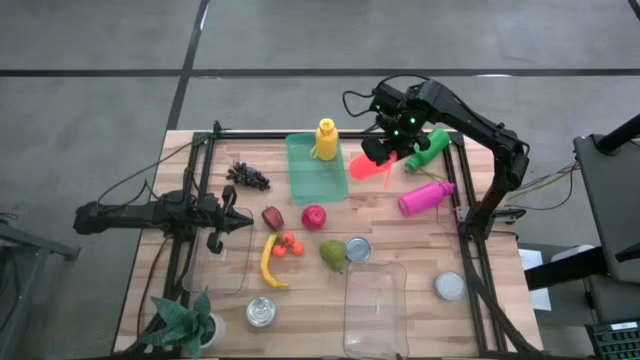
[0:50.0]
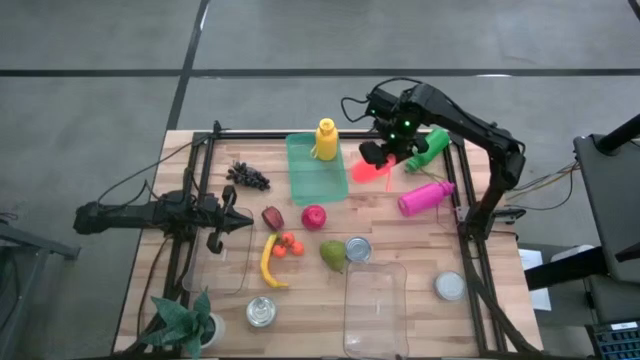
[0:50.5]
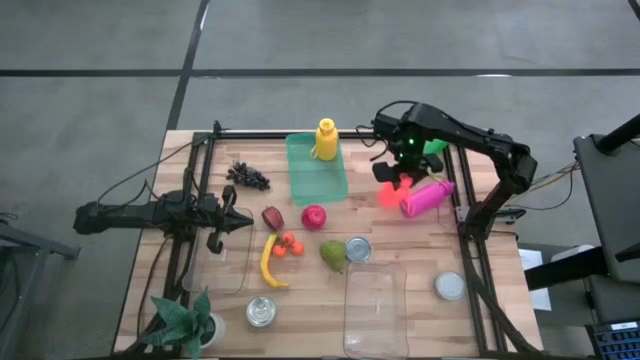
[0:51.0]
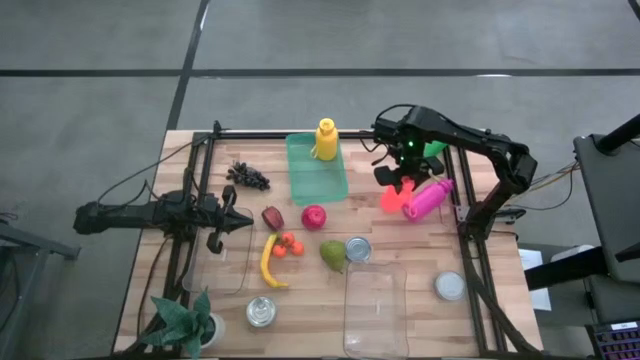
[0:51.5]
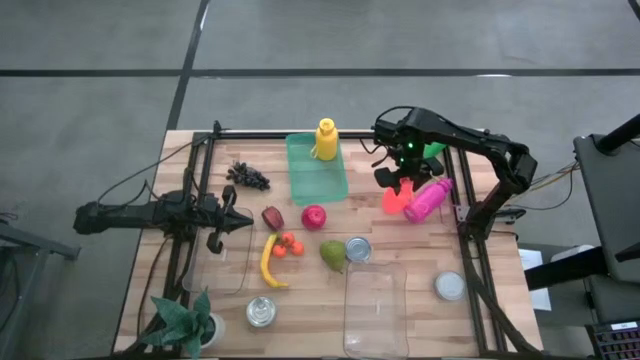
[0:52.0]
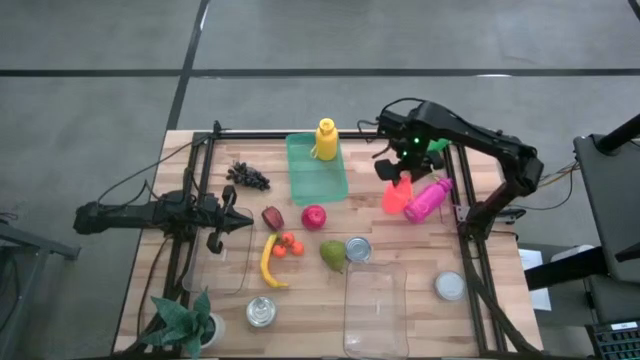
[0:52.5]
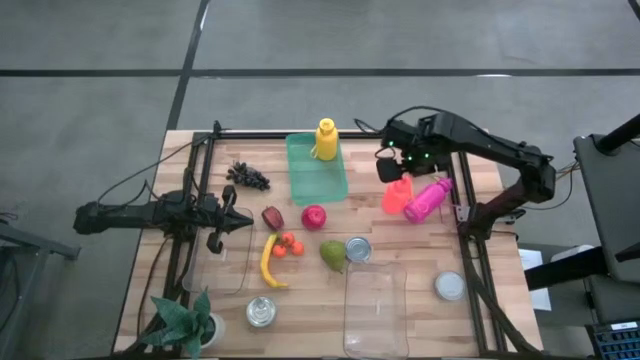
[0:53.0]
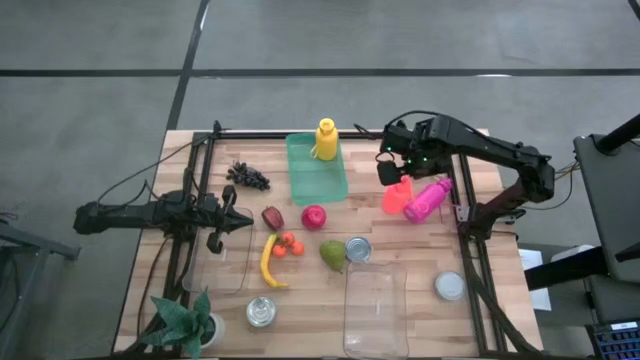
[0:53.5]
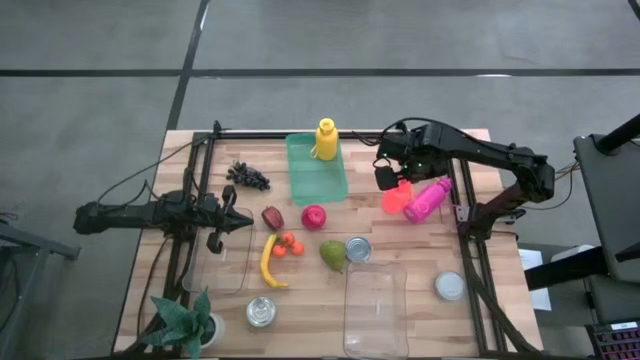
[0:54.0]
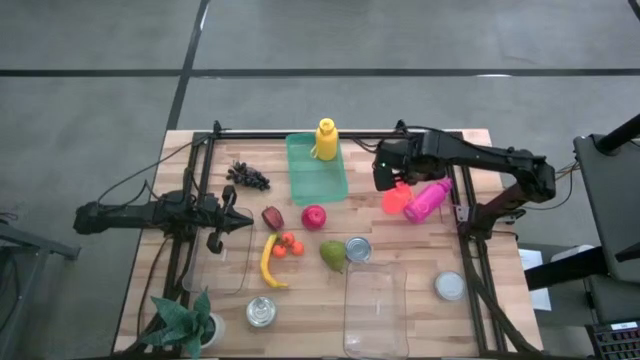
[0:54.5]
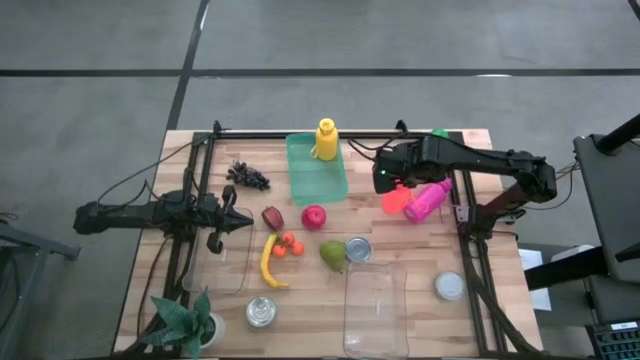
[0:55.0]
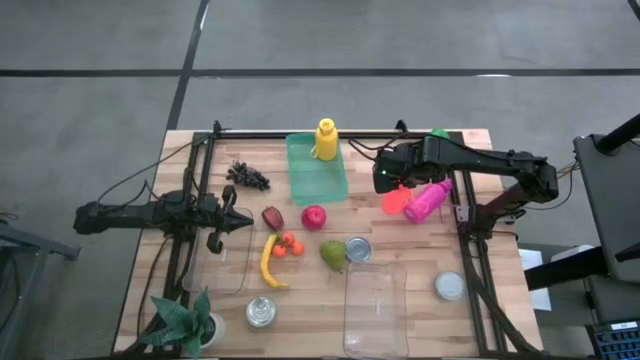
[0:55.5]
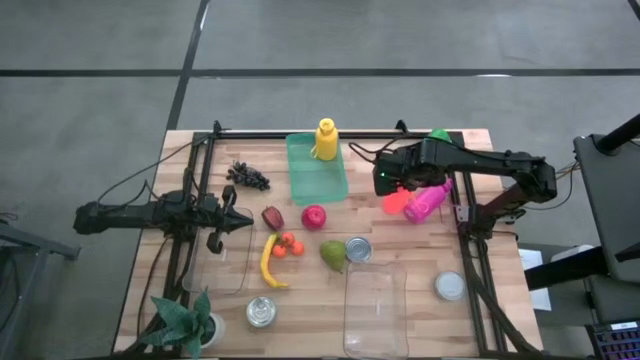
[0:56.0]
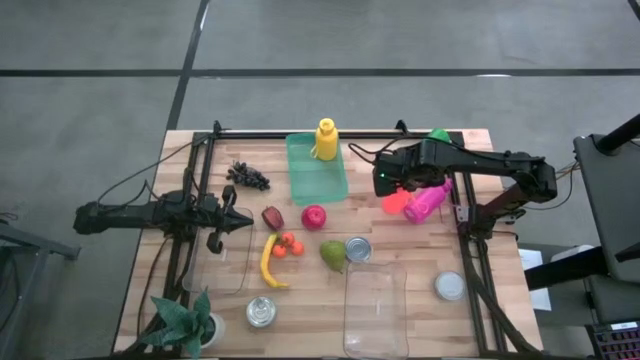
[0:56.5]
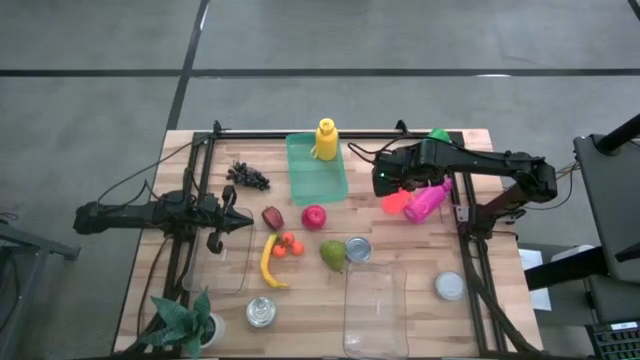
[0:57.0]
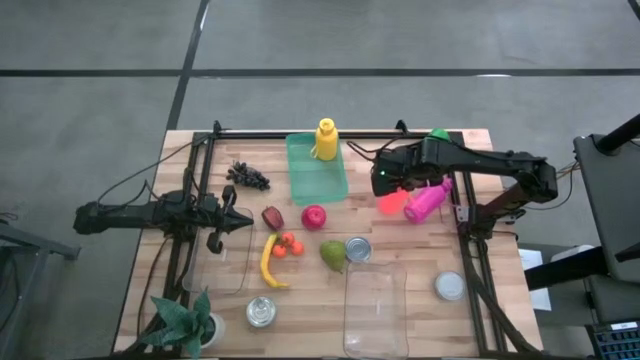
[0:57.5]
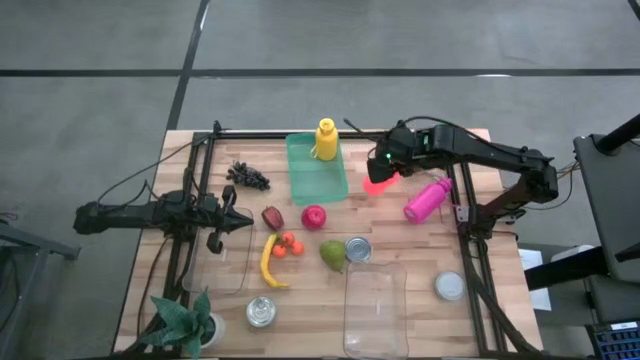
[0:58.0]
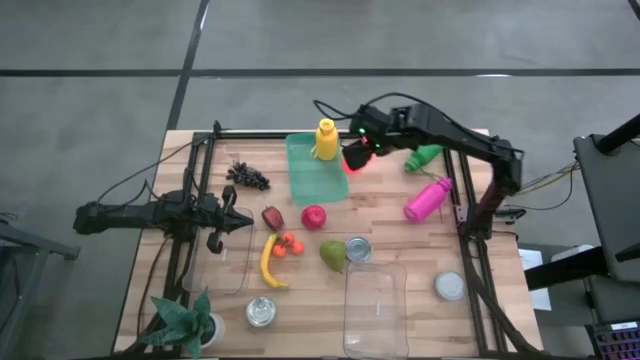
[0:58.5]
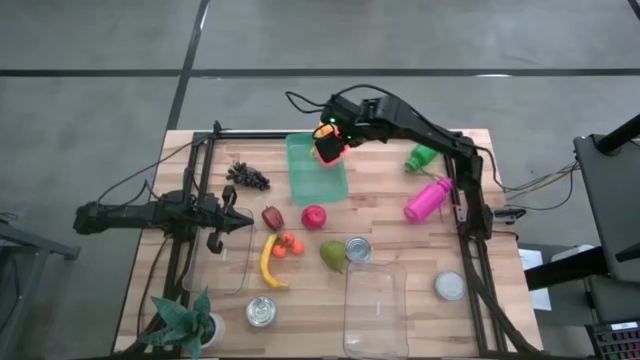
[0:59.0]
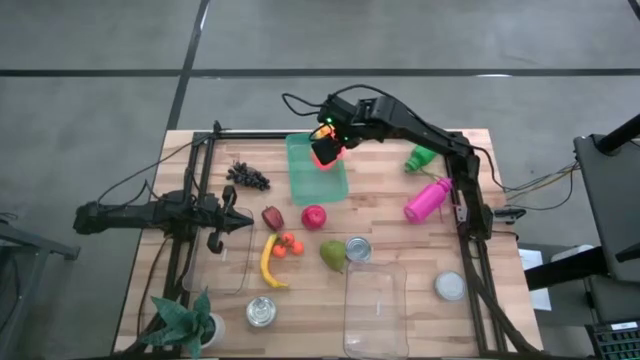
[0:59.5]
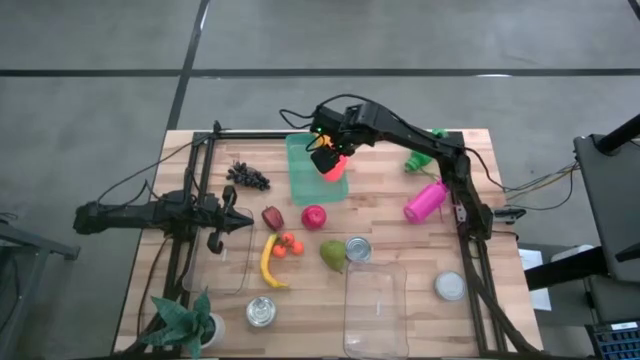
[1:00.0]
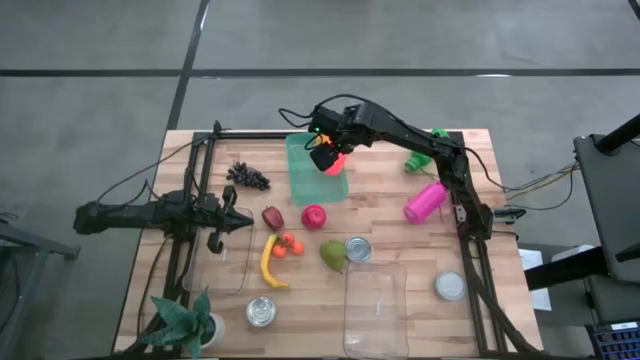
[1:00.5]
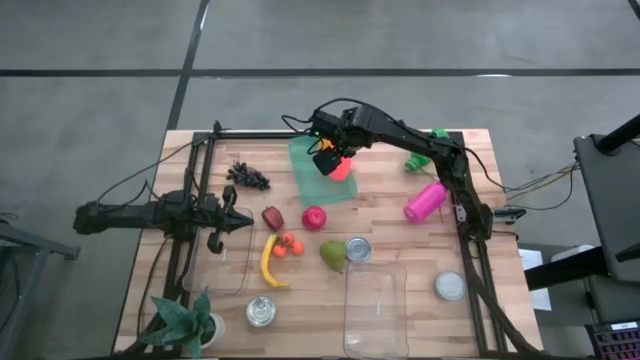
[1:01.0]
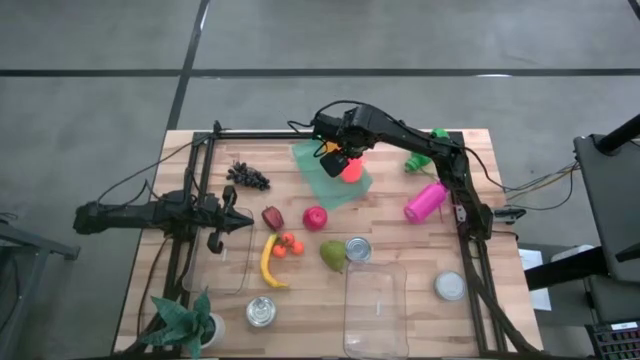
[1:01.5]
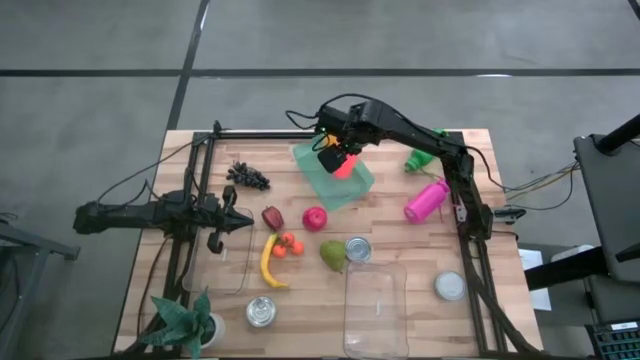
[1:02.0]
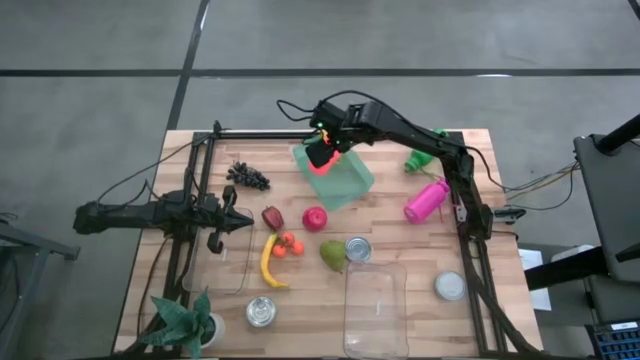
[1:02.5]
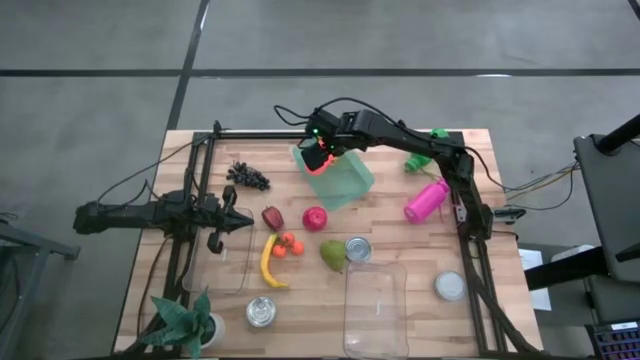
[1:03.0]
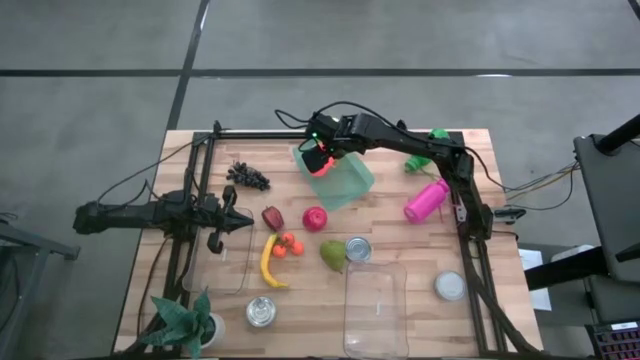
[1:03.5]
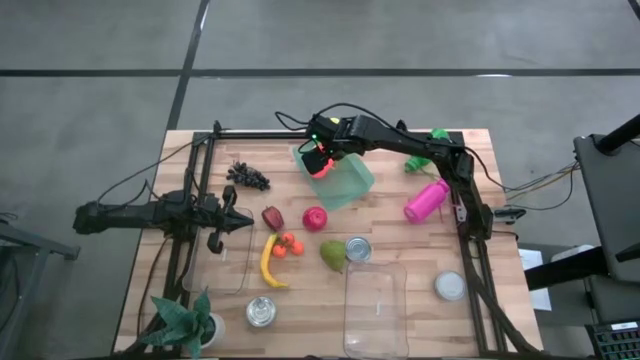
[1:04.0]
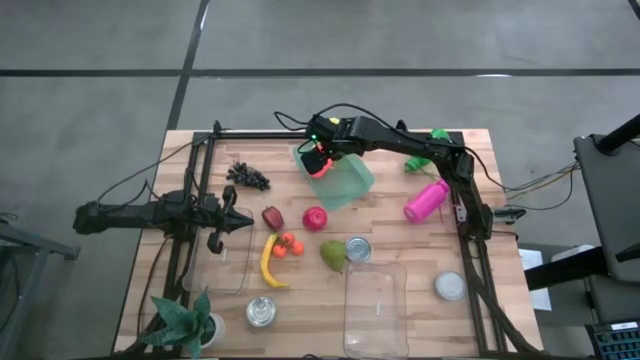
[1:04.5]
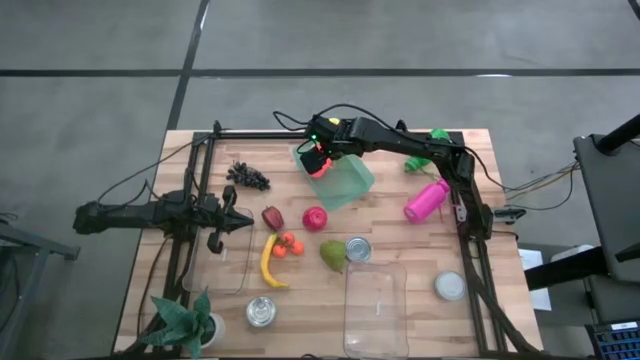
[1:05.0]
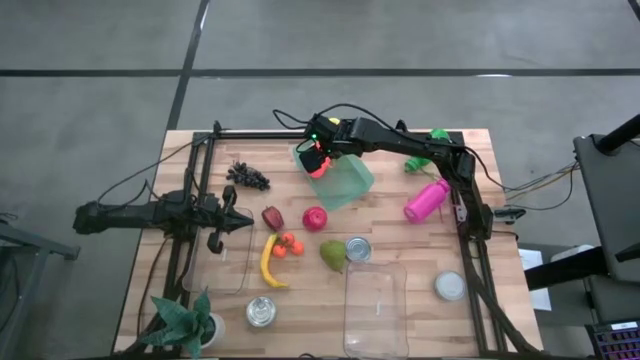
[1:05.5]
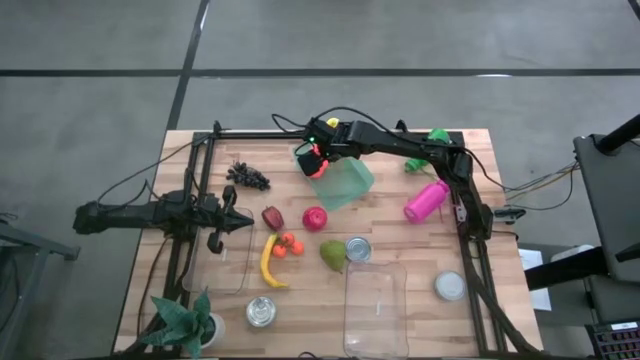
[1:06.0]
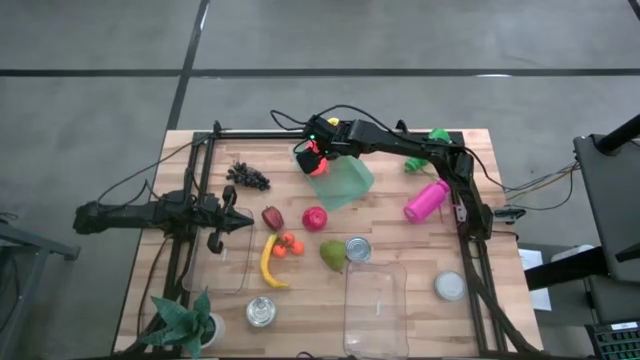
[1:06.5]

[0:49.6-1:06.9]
Task: Pick & Place Food Item
Put the orange water bottle into the green bin

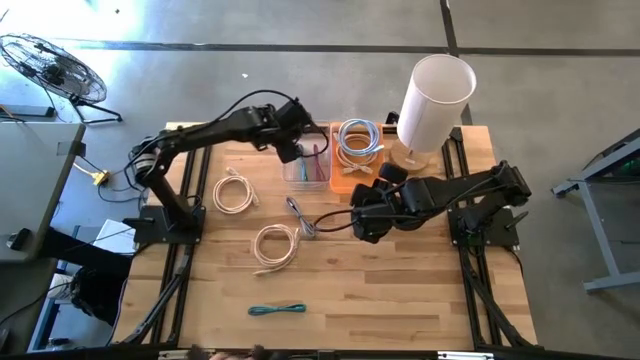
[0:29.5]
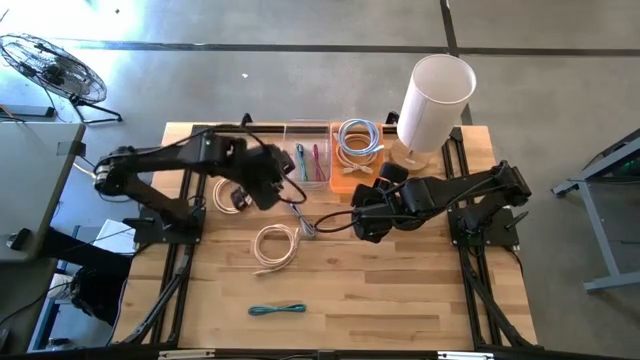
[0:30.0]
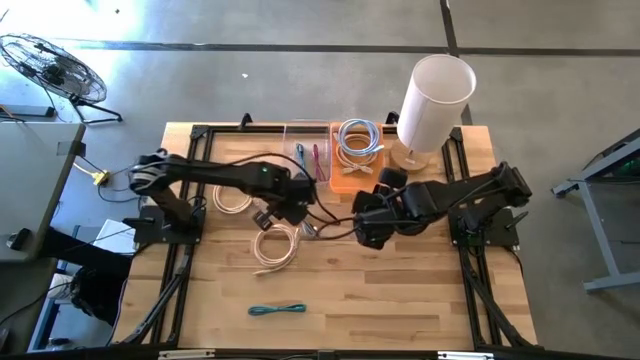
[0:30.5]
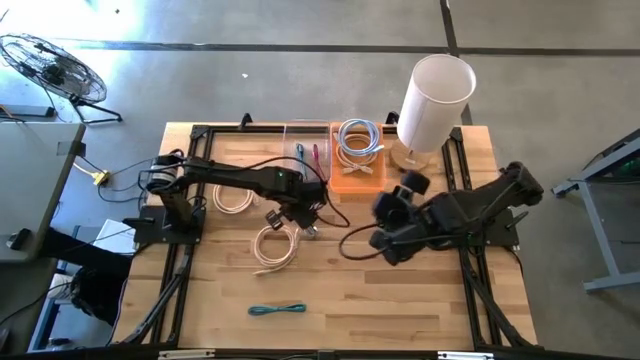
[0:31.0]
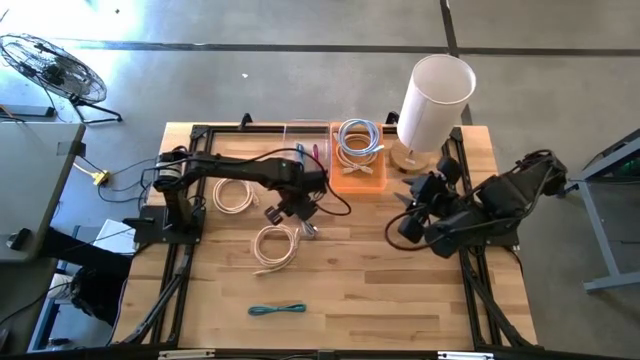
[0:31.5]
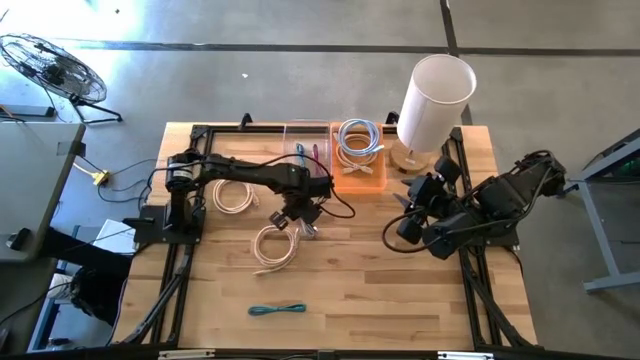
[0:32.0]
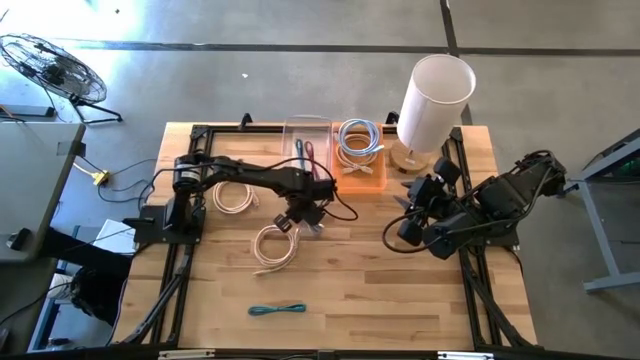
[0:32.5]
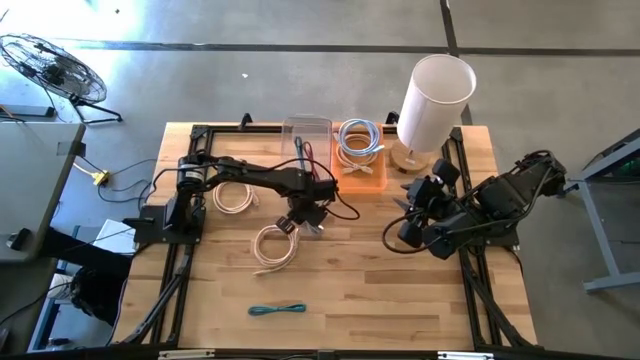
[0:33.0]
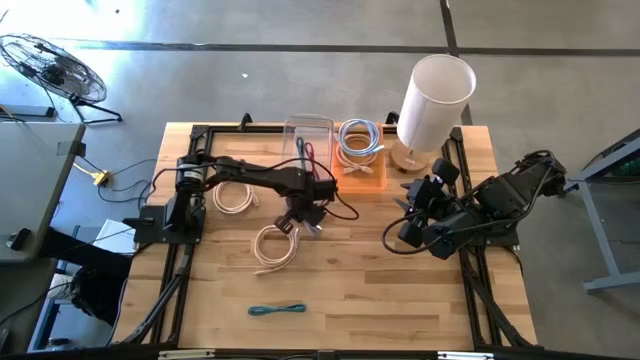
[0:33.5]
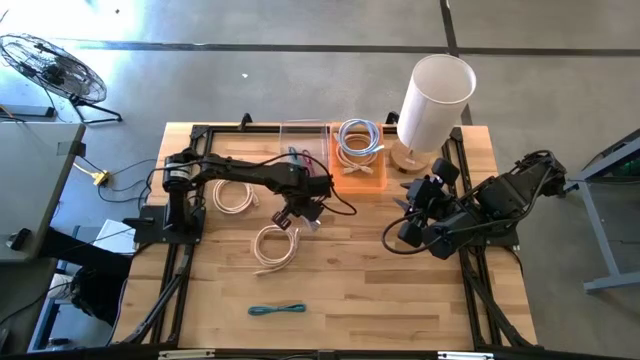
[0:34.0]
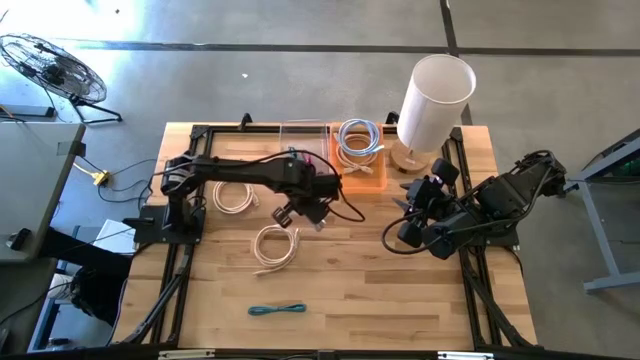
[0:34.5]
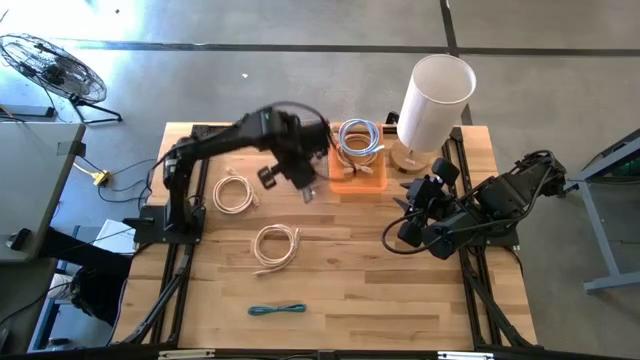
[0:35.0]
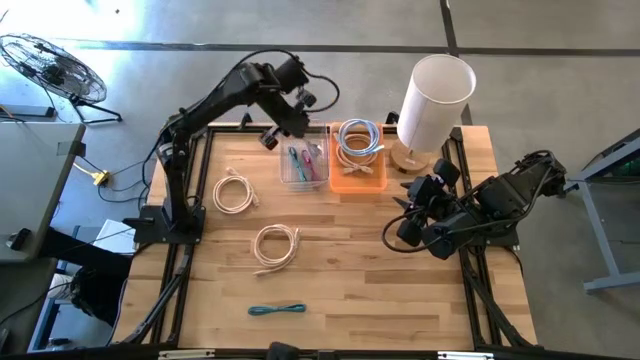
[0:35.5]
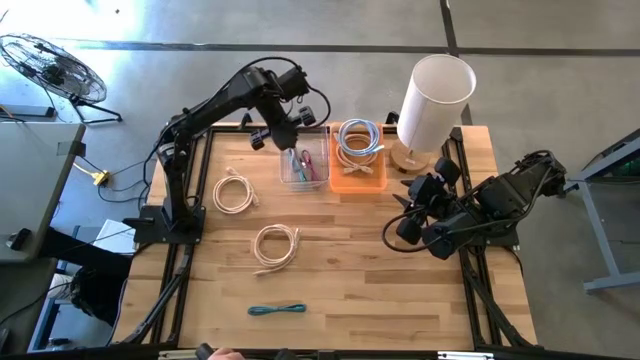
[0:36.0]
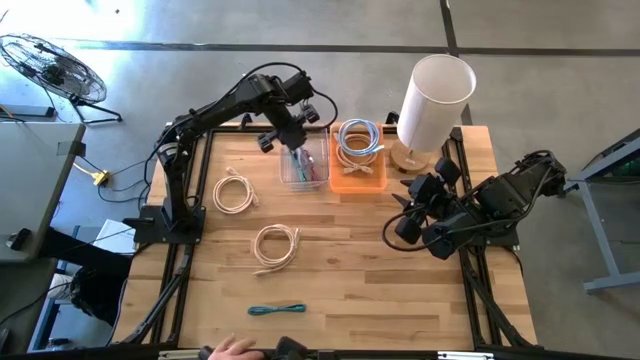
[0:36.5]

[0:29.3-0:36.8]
Task: Pick & Place USB Port
Put the white charger cable into the transparent bin
